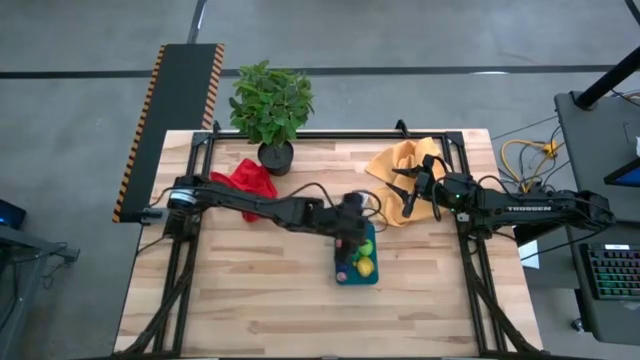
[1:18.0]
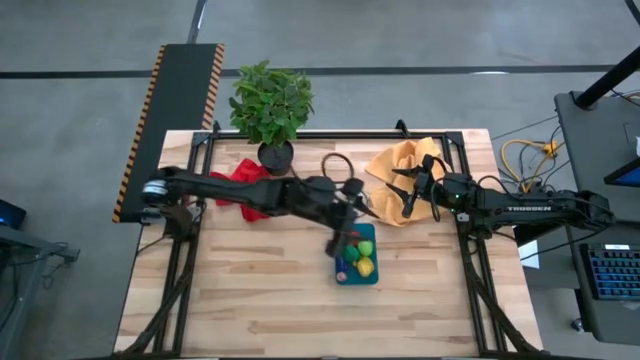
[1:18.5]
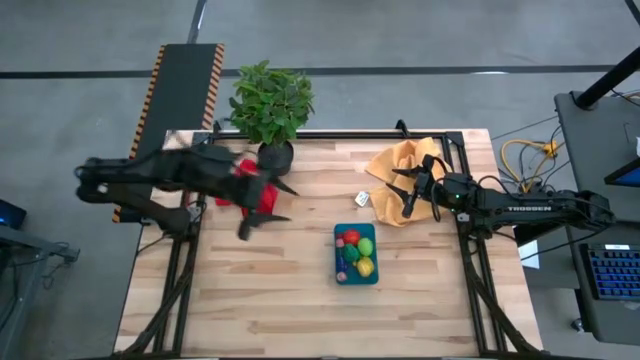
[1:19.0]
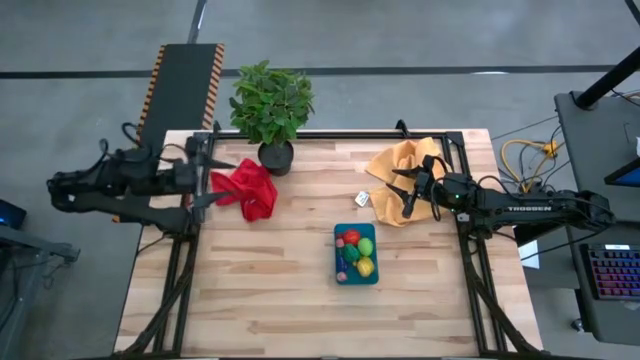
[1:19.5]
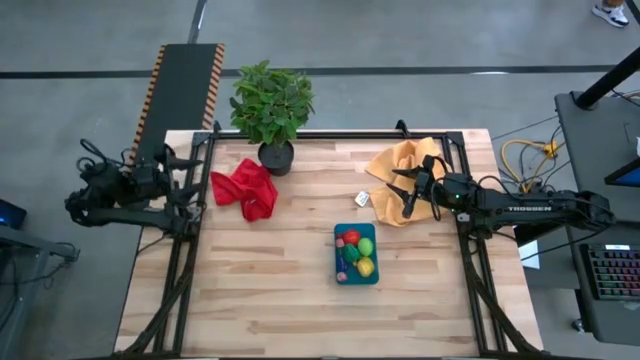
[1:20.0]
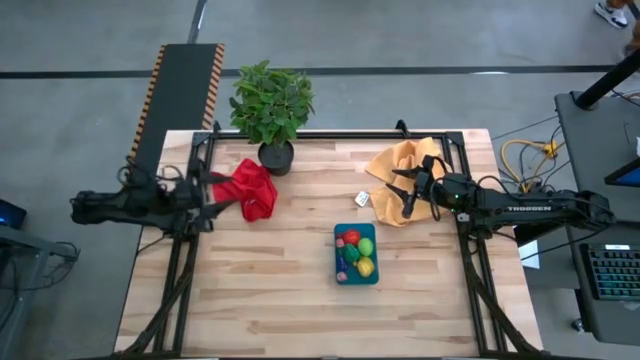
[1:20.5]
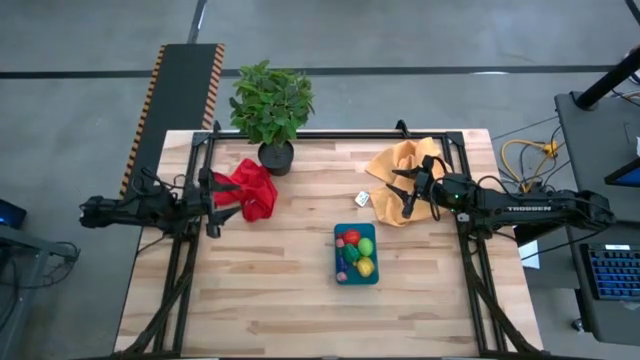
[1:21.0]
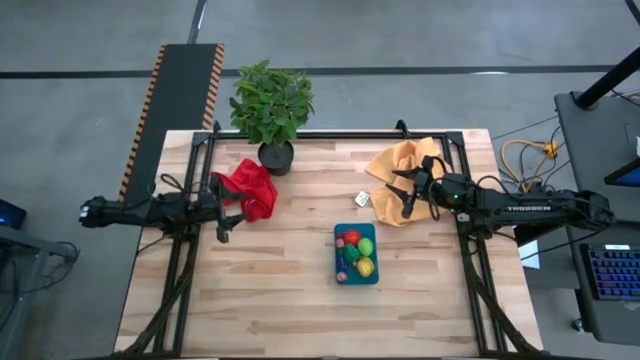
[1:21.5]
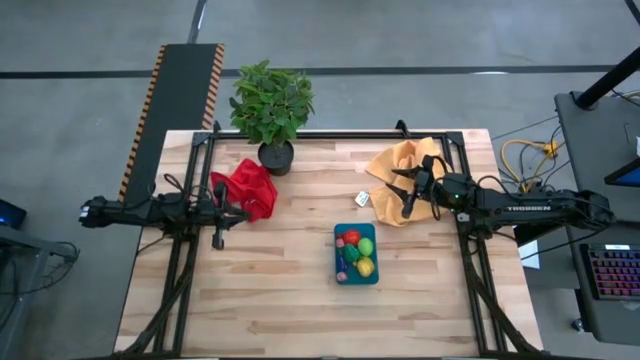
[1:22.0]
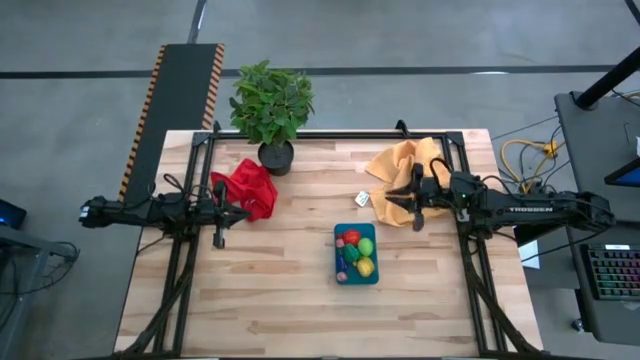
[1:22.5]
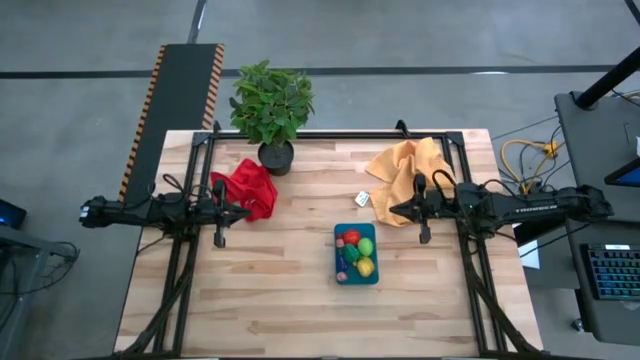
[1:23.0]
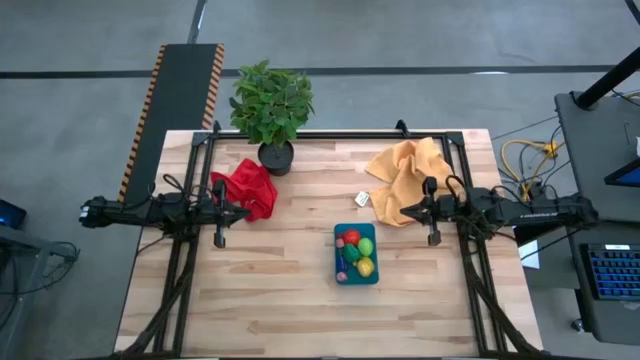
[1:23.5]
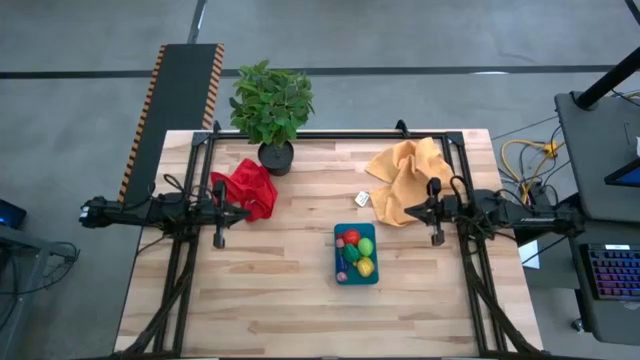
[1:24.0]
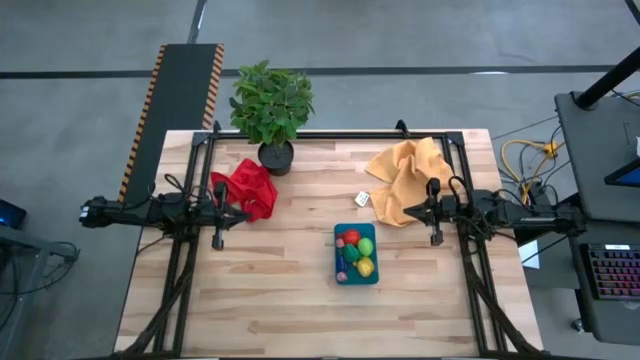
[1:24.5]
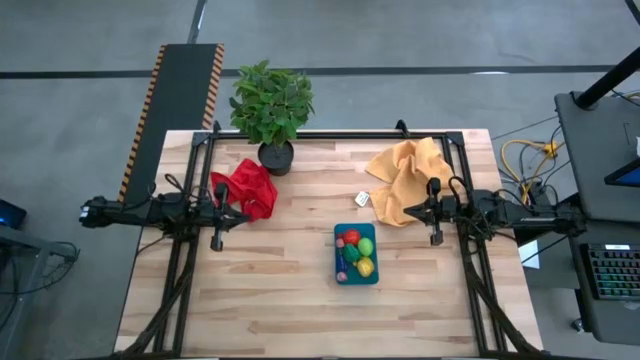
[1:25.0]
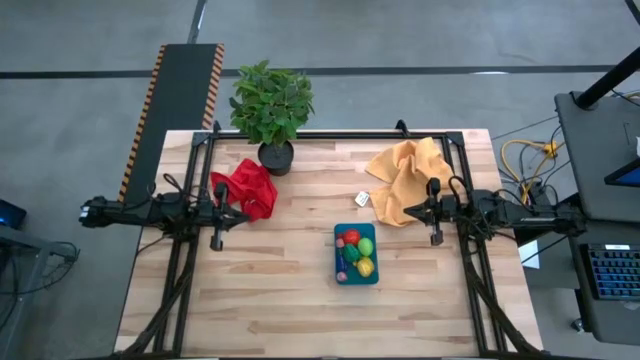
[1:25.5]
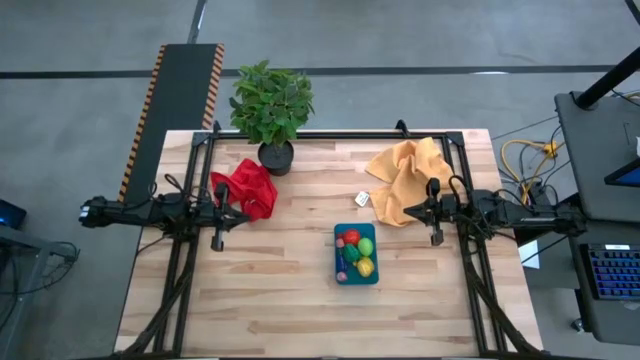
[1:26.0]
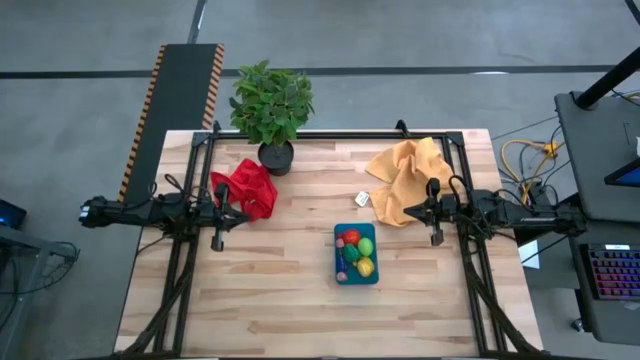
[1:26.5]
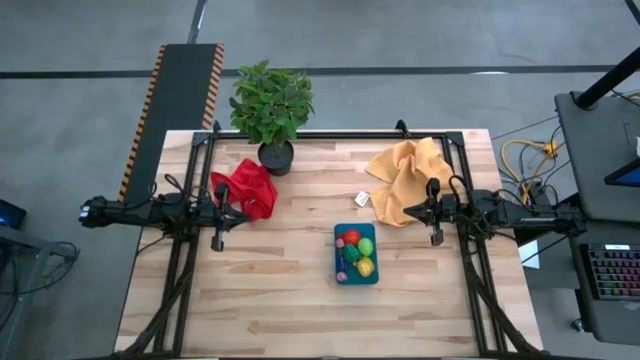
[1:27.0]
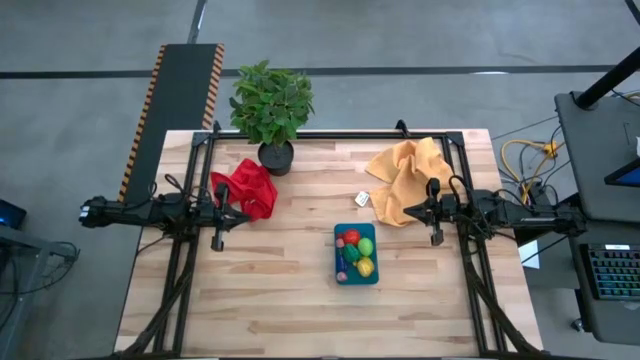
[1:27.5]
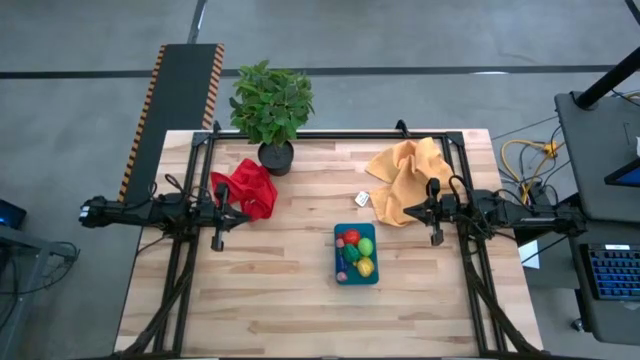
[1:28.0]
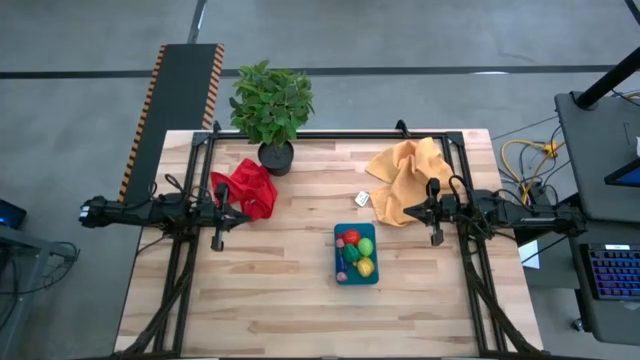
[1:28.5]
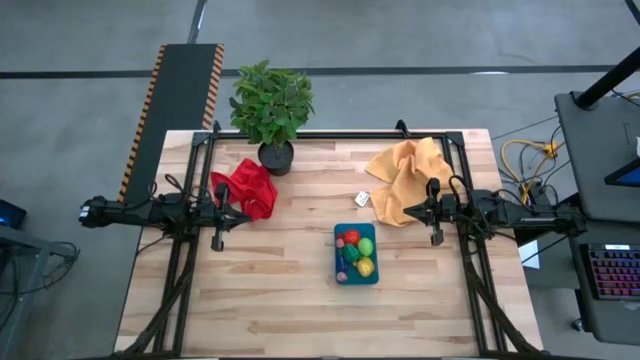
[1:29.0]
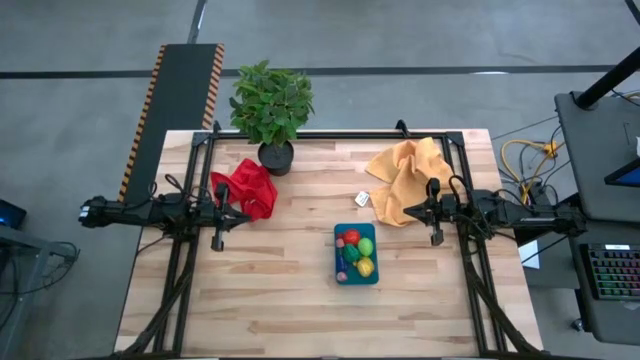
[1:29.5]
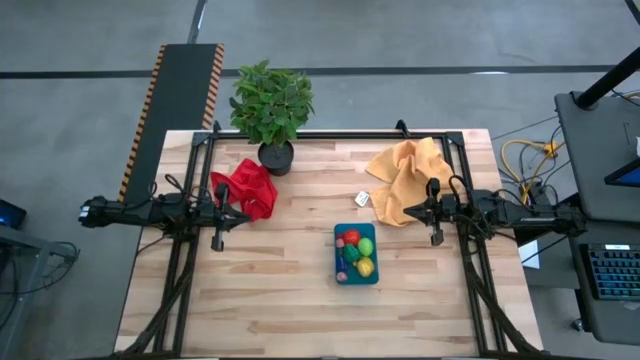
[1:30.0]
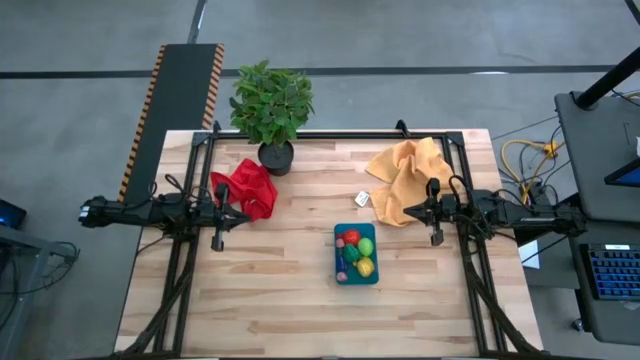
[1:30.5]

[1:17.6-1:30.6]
Task: Pick and placing Produce into tupperware
Return to Home Position

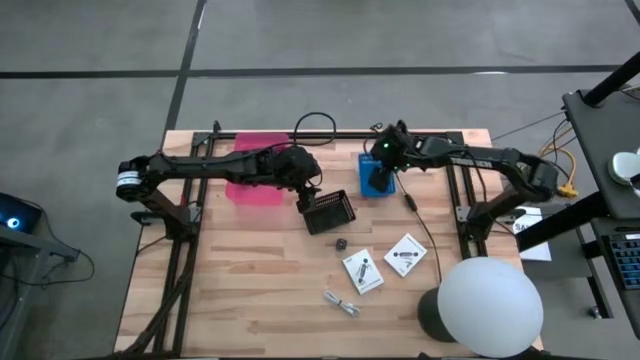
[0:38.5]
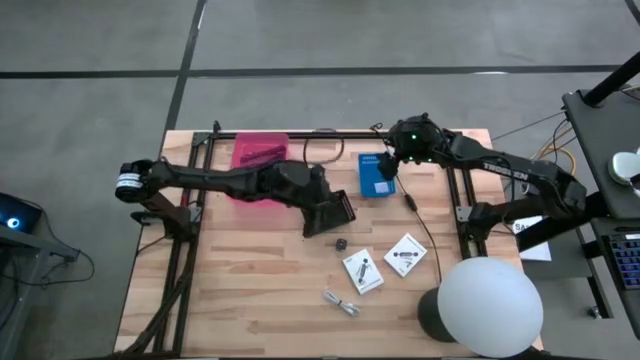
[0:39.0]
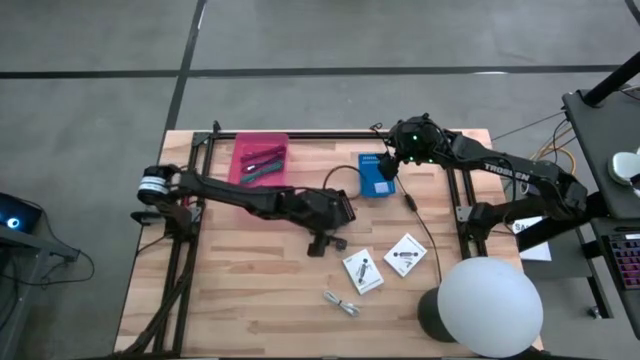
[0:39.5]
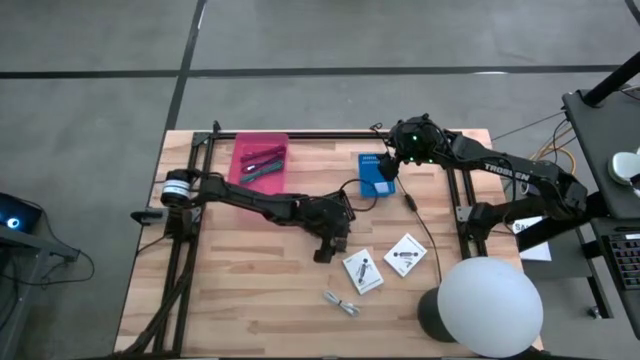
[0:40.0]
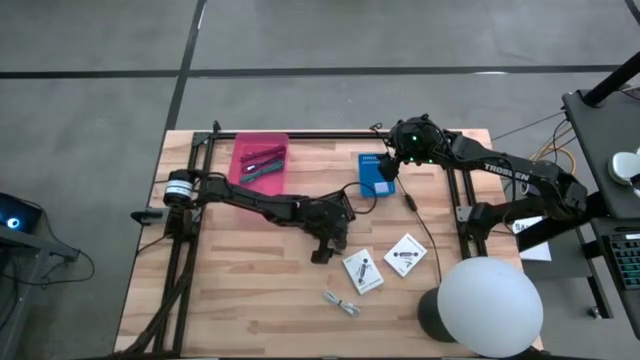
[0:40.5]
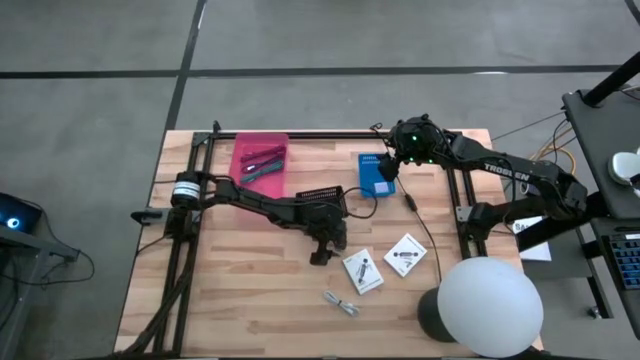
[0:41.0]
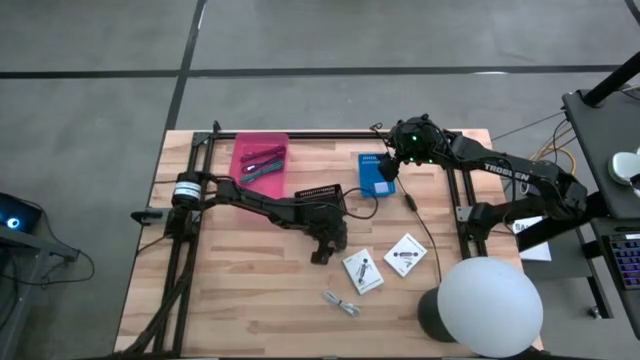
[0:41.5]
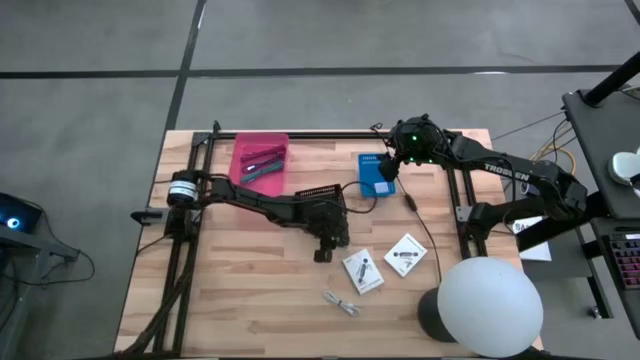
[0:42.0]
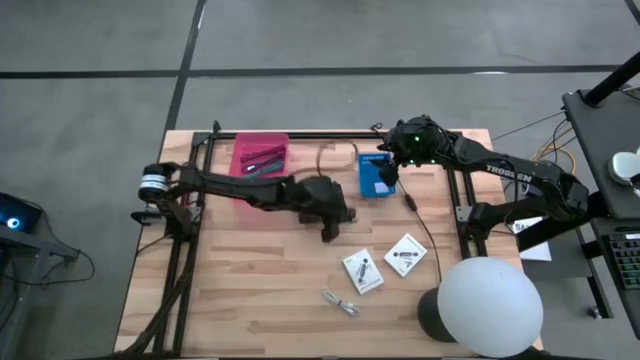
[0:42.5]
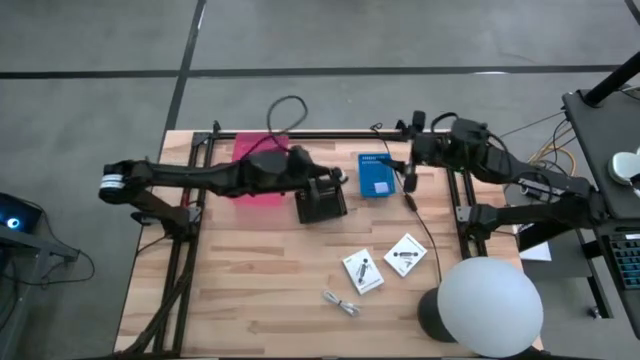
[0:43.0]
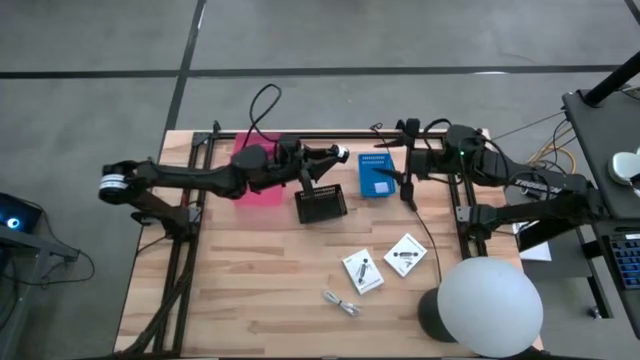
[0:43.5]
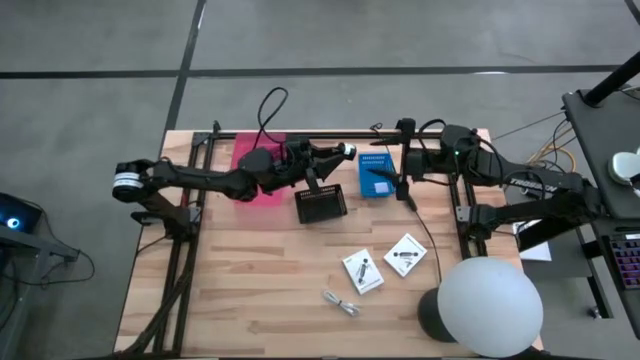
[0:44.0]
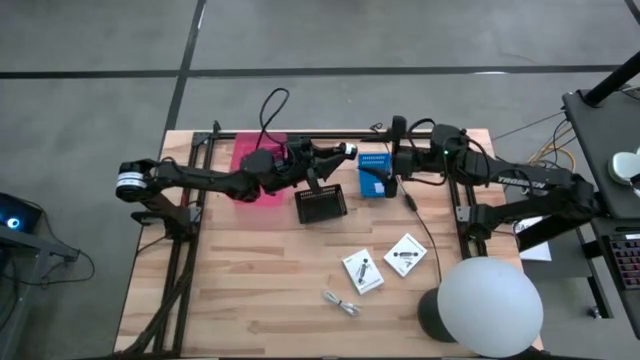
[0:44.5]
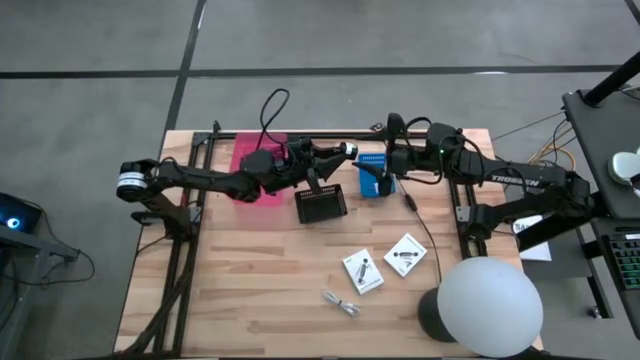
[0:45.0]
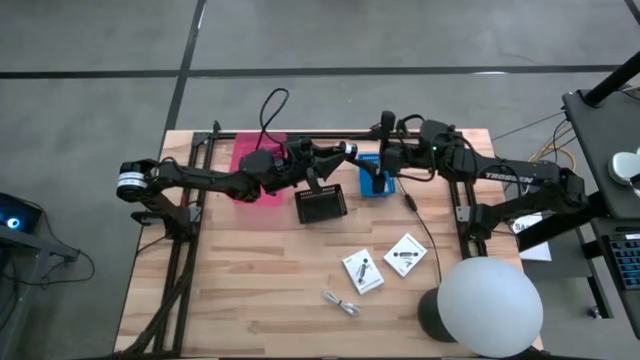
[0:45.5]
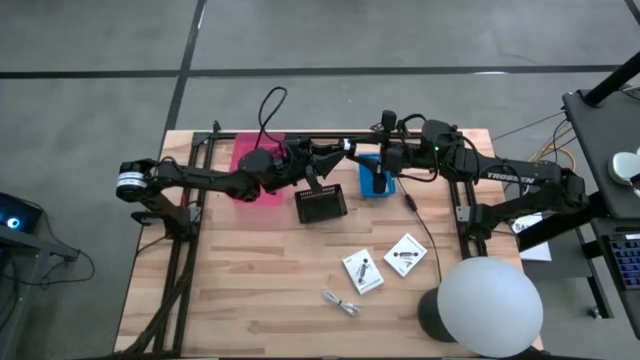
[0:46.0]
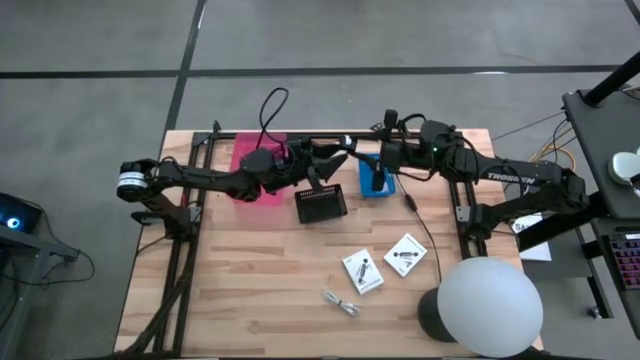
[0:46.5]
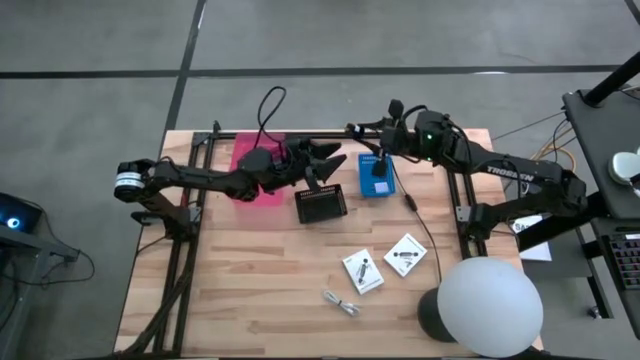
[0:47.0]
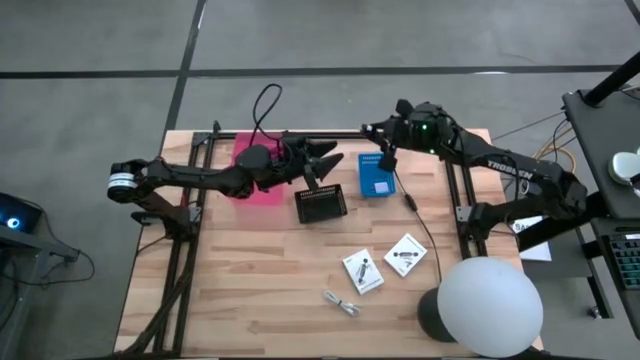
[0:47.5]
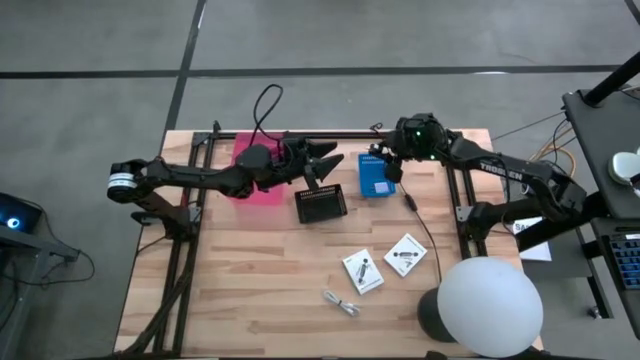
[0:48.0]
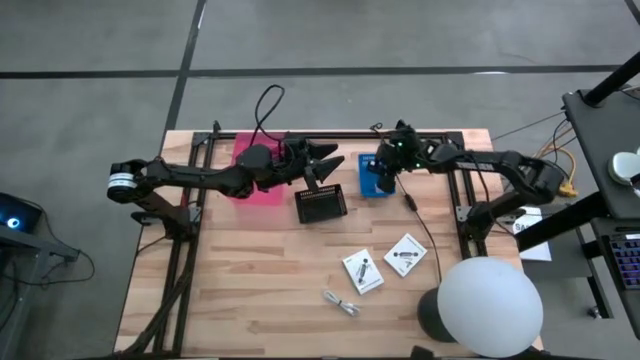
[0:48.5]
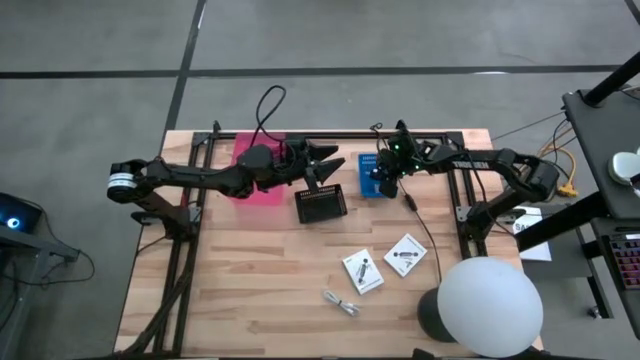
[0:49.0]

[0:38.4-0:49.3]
Task: Pick and place items into bin
Put the black charger adapter into the blue bin
